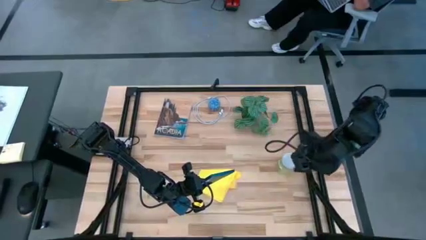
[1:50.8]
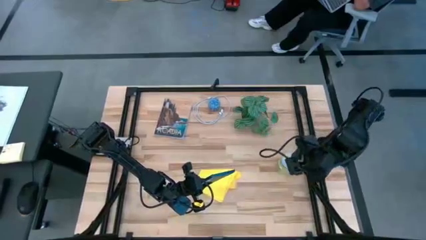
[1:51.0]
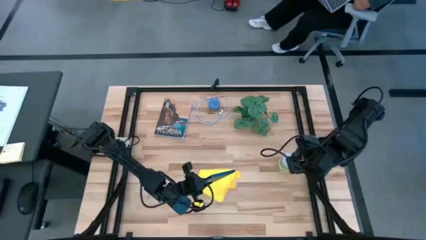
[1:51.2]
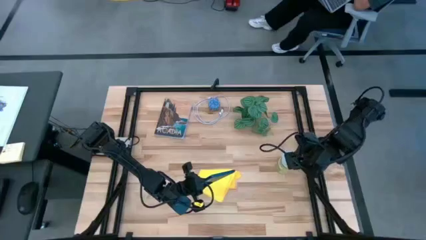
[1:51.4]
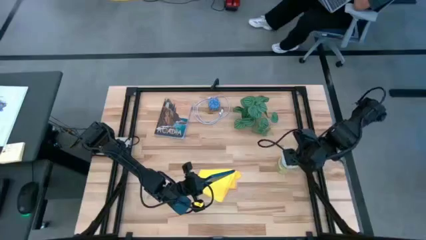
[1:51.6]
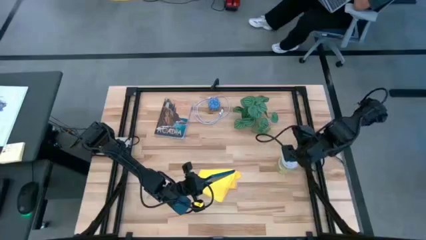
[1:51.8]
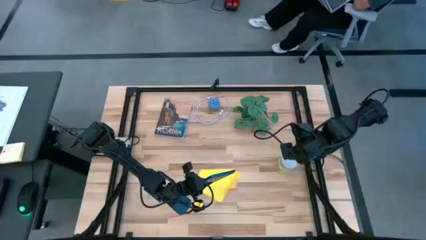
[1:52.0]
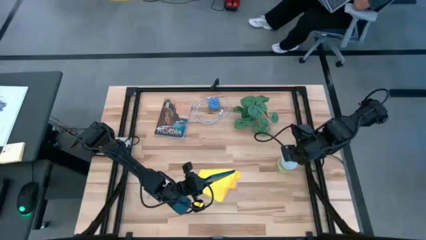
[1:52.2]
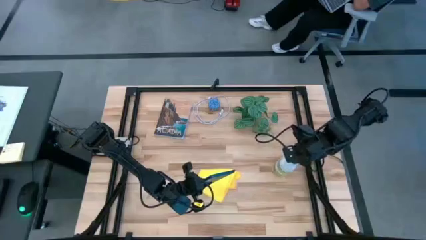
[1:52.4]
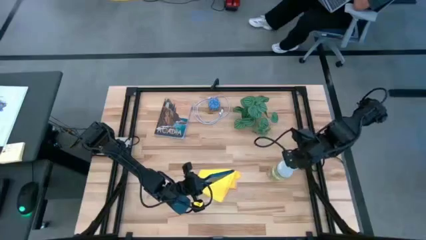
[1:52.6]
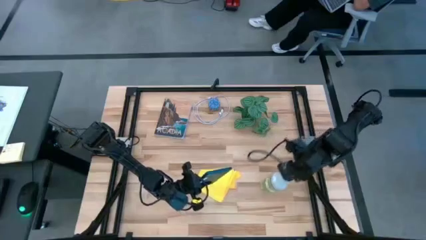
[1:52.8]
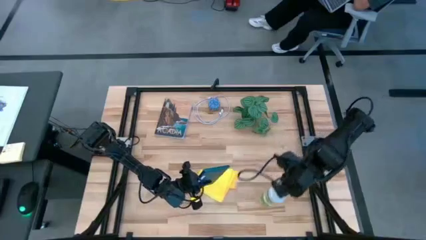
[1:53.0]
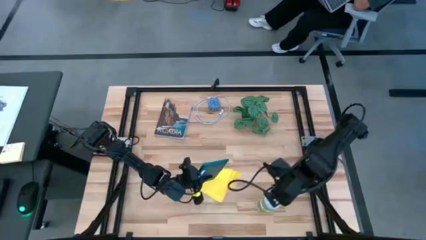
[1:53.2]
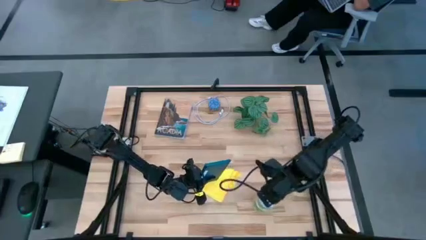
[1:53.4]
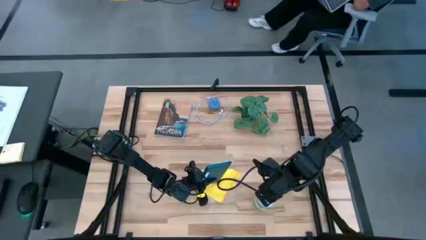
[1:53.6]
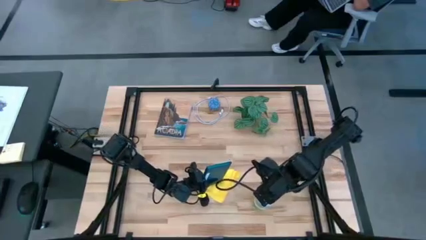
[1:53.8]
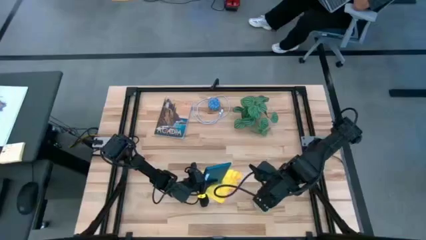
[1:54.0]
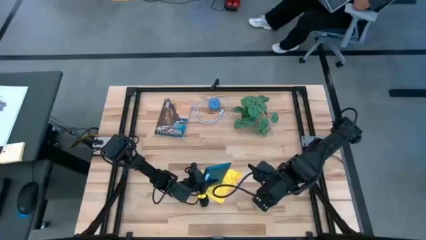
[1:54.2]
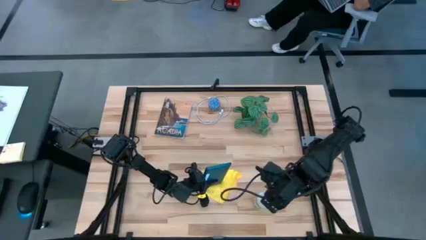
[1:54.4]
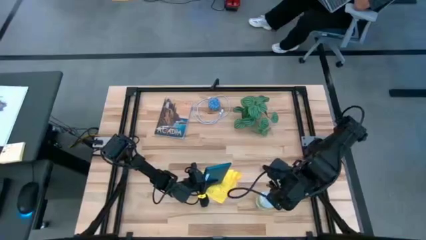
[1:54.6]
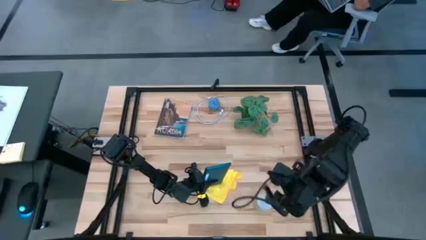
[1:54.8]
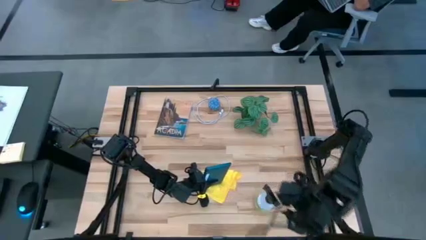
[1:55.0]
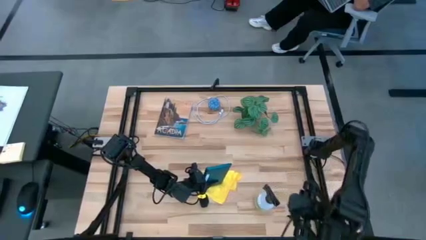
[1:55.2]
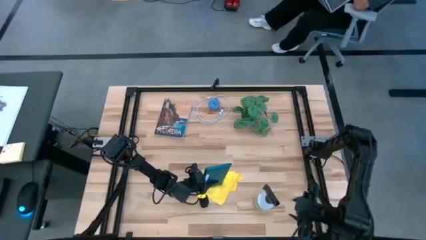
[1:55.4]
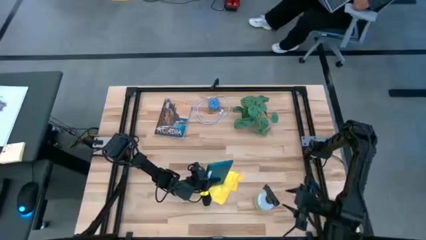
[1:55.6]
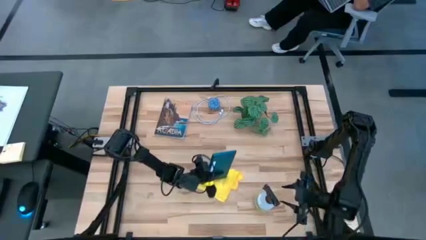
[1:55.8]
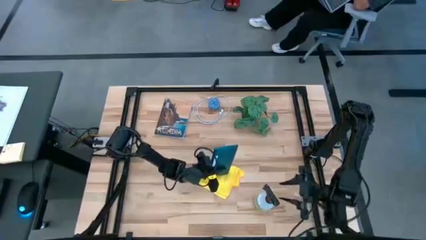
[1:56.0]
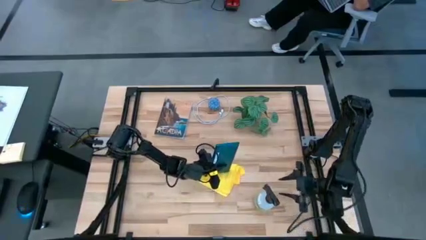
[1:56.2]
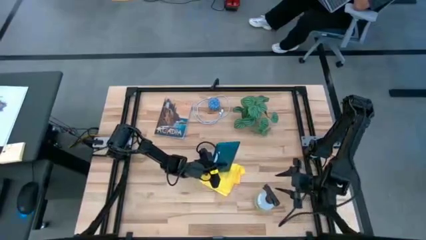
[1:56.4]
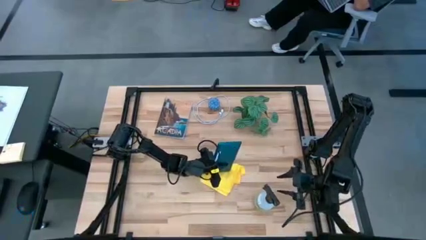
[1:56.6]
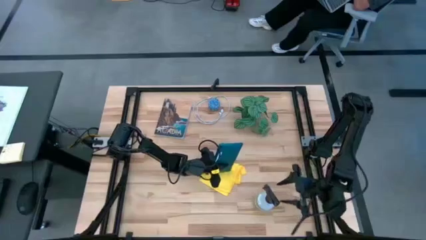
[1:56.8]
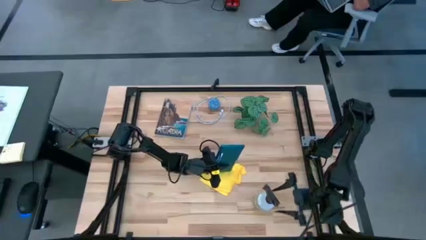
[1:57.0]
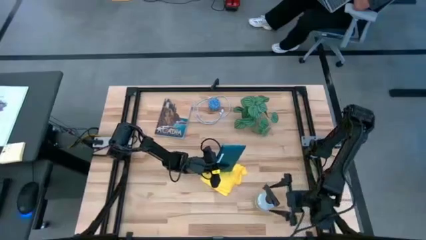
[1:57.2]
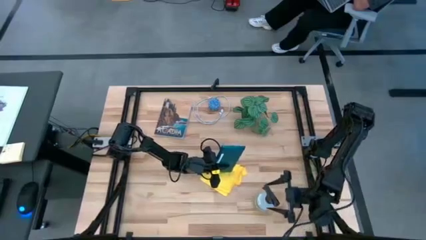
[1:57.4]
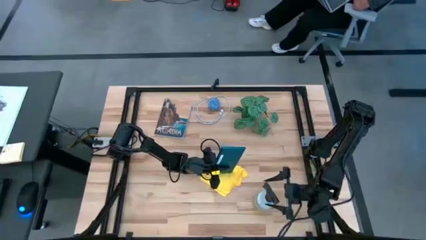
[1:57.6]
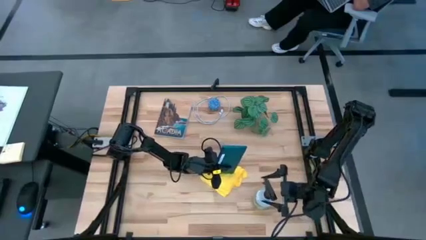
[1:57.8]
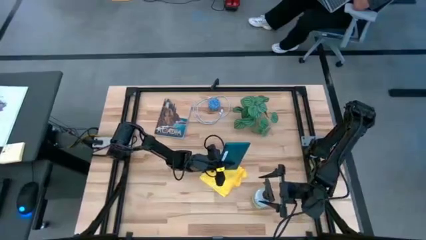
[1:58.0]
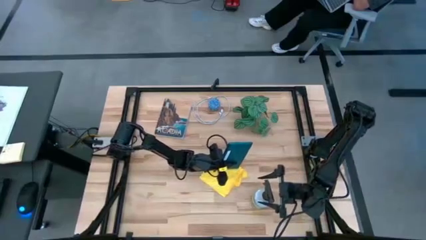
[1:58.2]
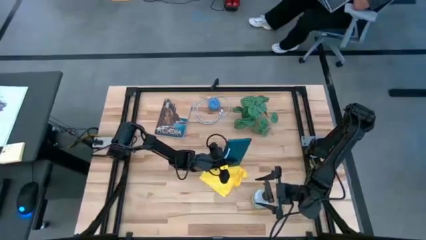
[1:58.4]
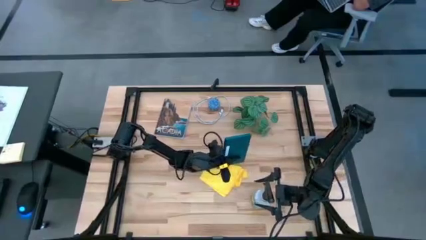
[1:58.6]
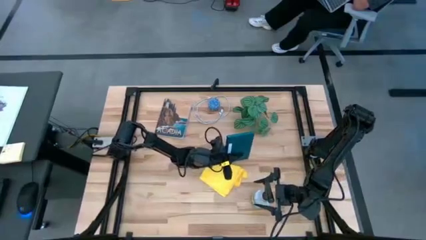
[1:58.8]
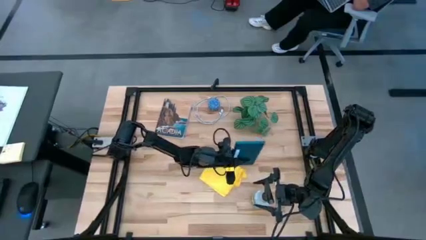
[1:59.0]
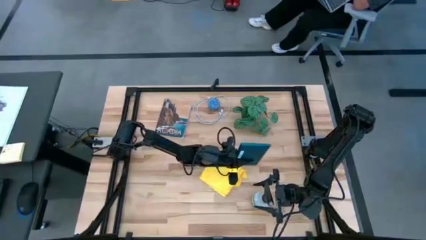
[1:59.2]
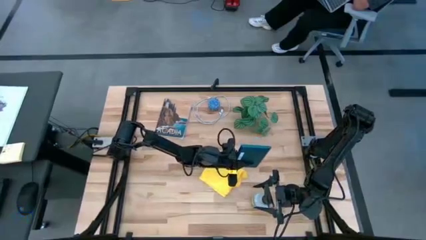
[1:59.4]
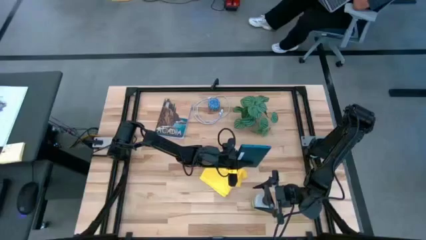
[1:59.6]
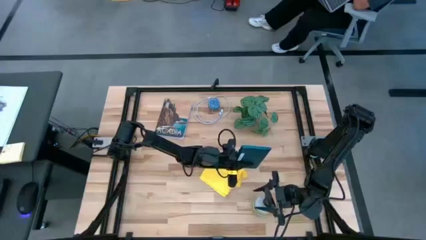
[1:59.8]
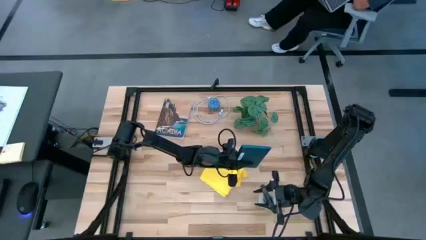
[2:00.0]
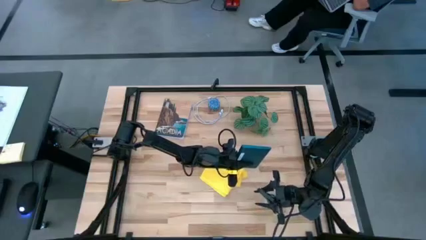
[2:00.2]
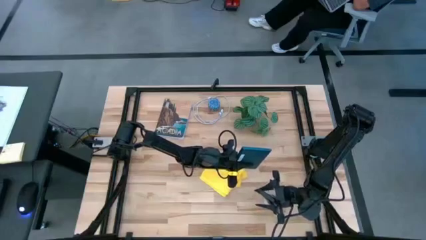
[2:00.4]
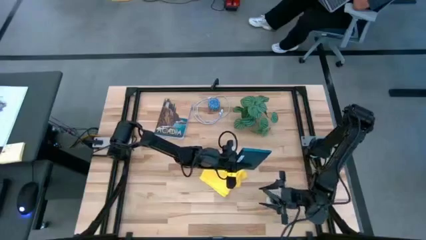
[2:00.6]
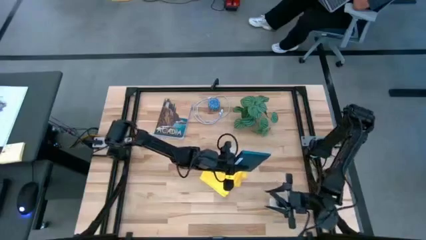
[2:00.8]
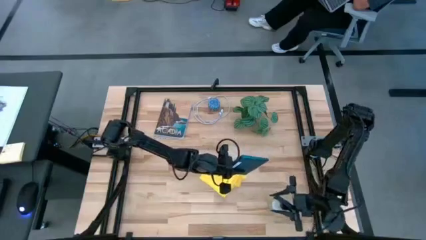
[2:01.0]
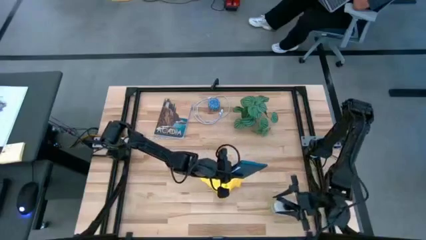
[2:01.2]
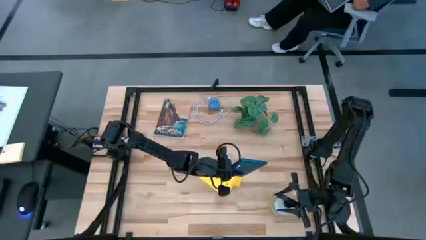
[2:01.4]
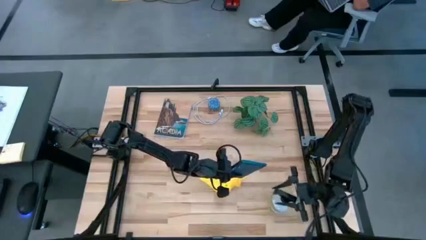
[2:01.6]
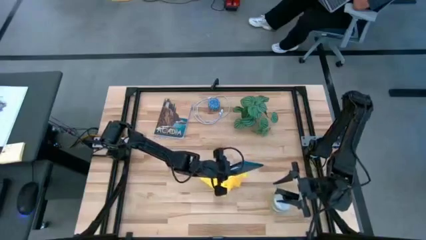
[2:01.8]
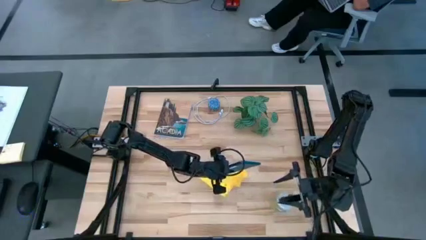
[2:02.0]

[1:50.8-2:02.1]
Task: Clean tablet
Spray the back of the tablet using the cleaning bottle
